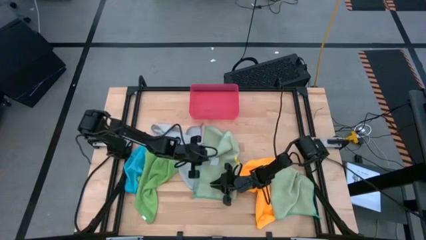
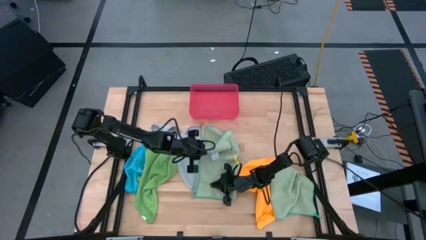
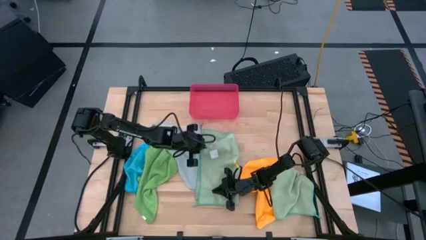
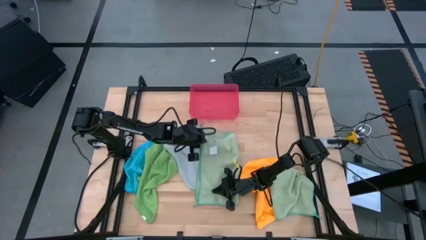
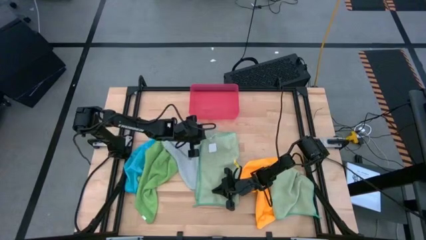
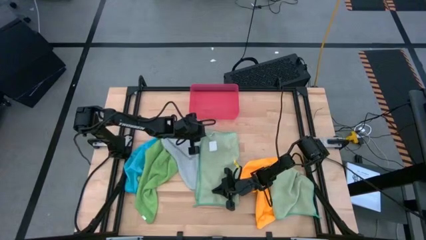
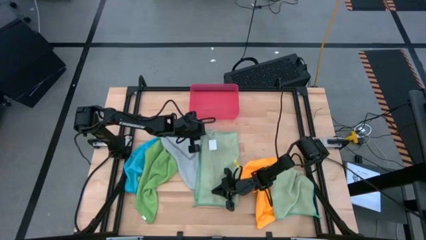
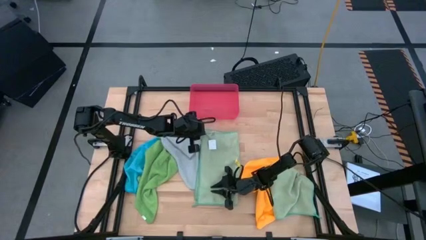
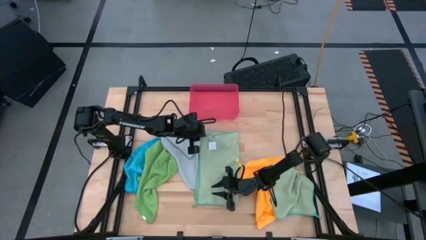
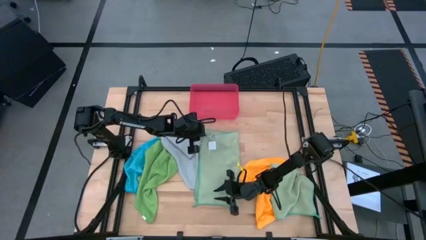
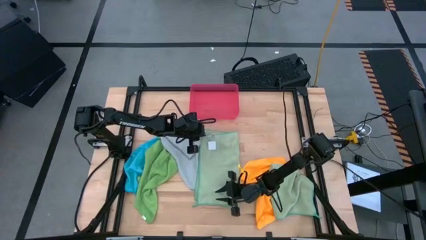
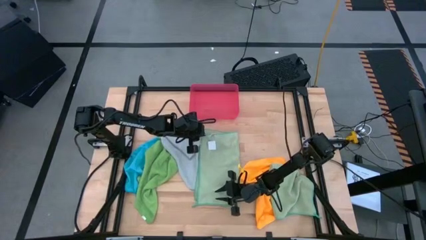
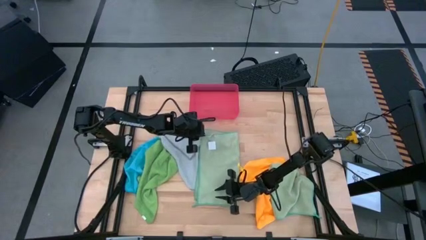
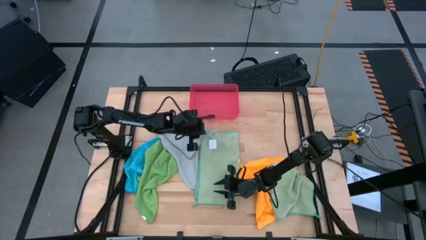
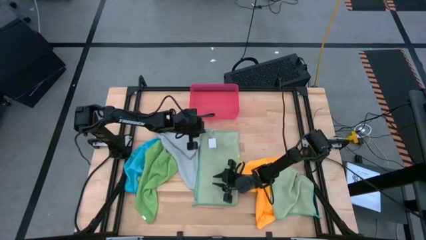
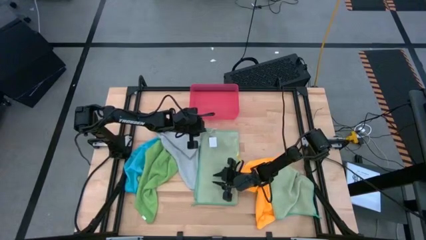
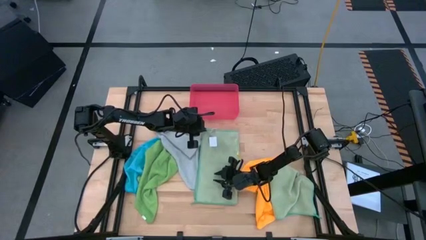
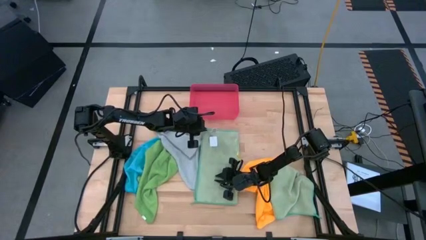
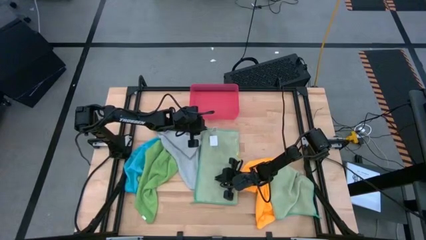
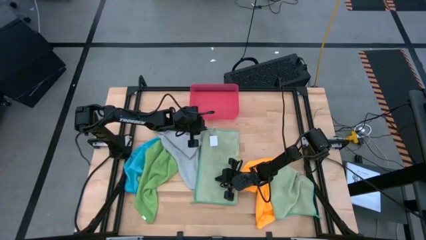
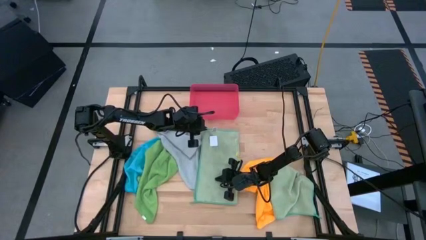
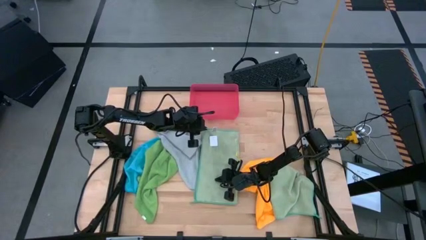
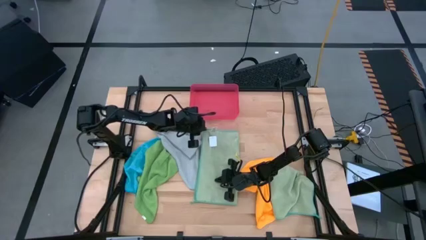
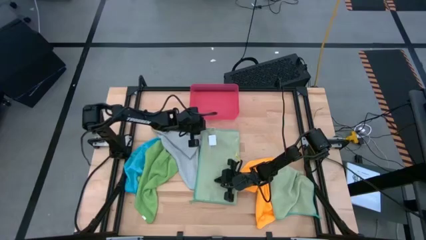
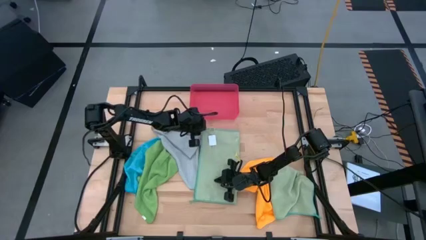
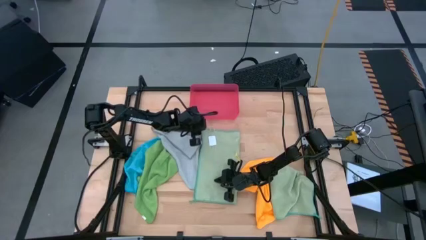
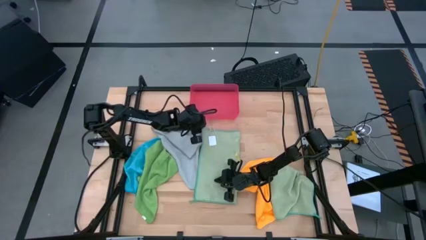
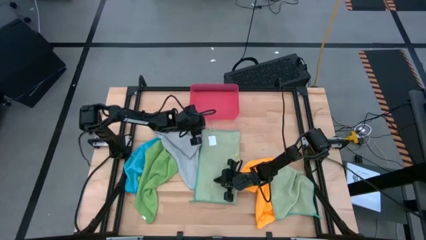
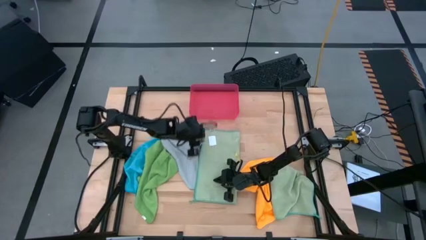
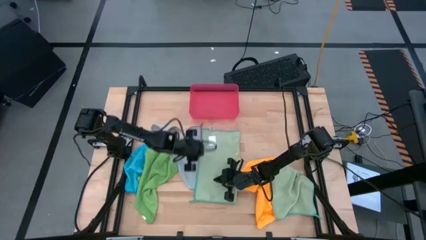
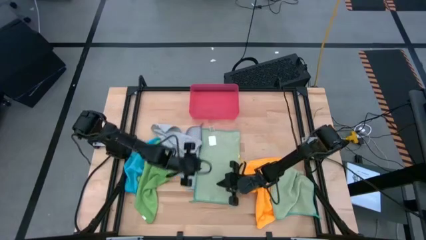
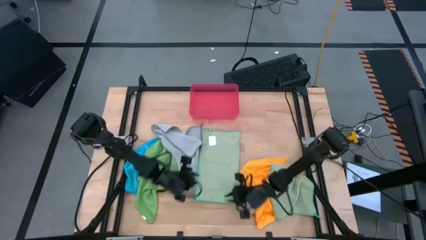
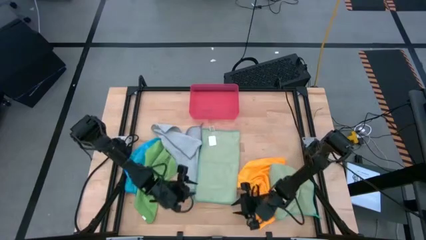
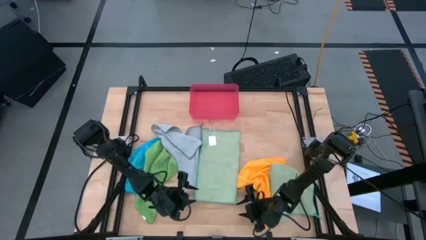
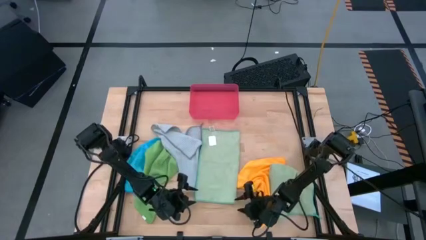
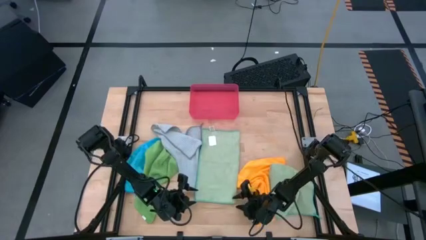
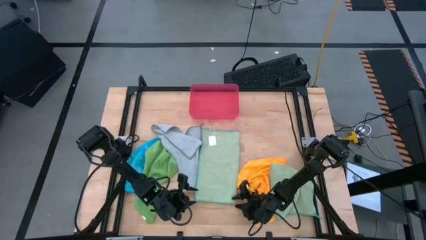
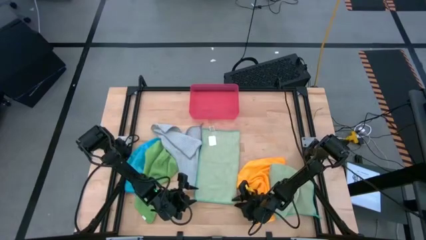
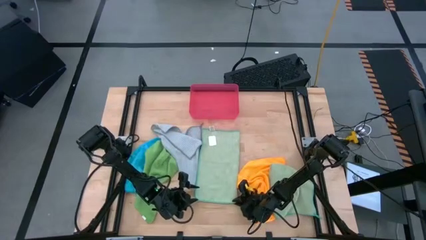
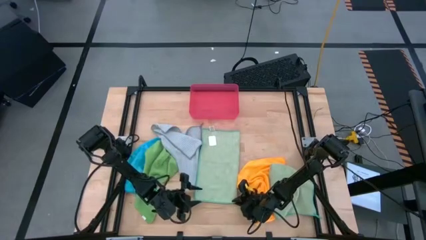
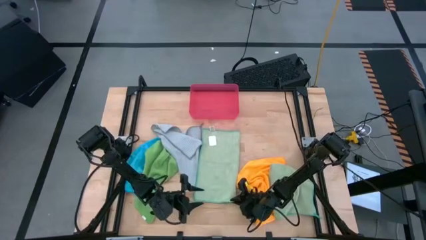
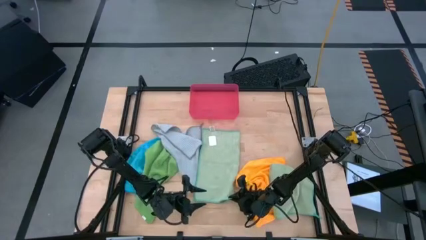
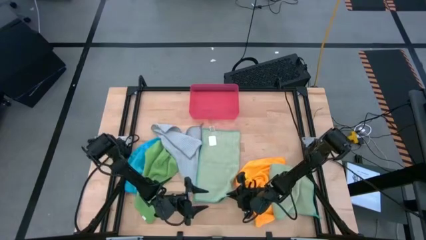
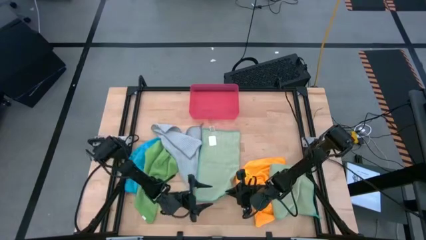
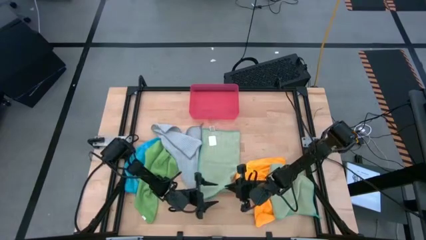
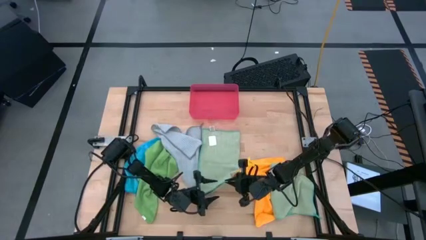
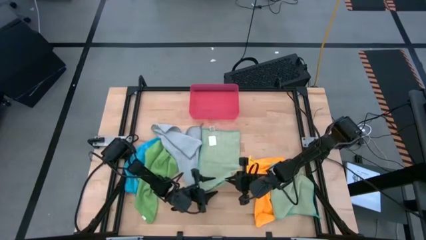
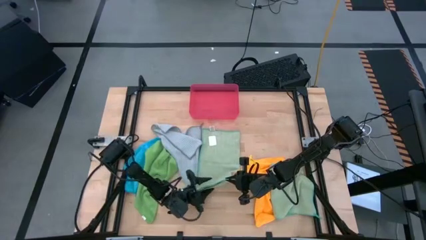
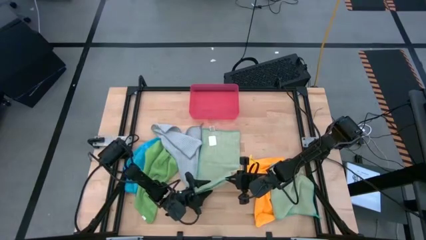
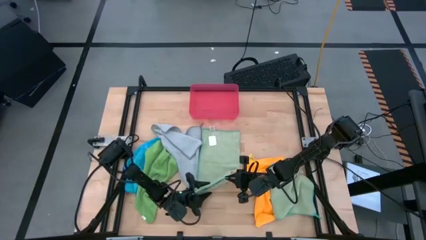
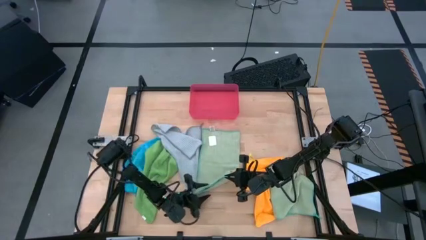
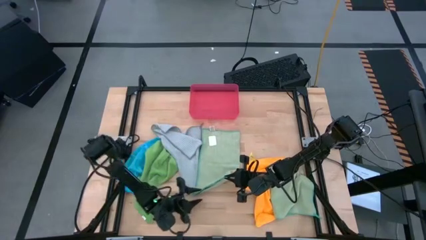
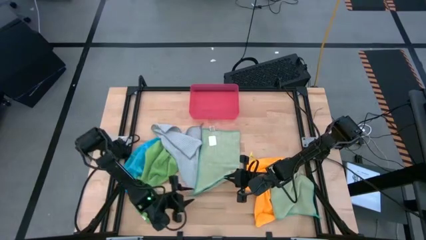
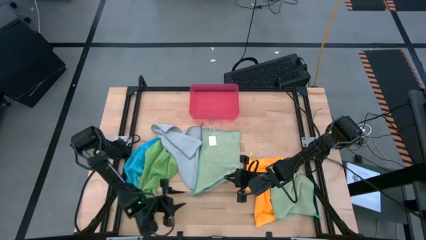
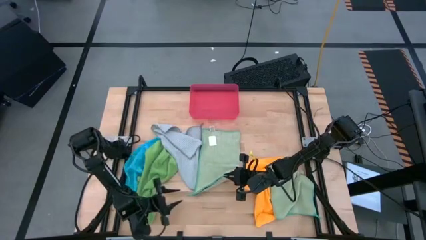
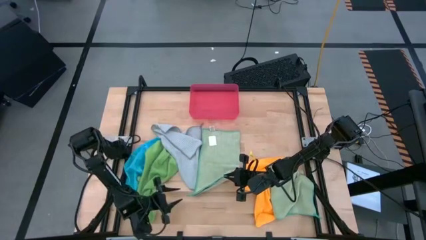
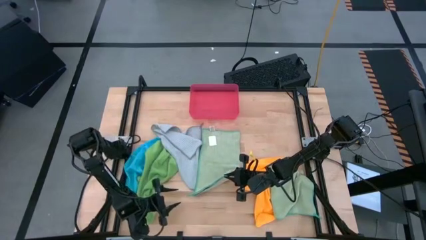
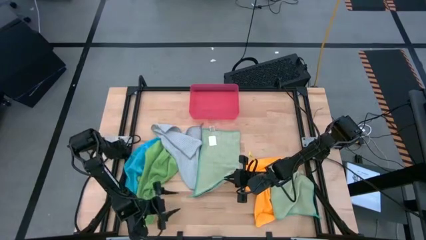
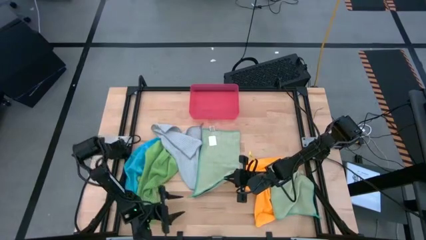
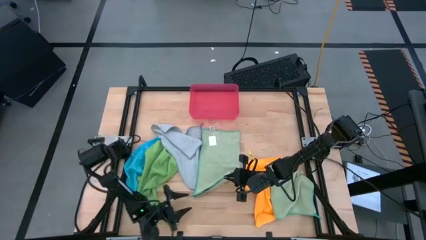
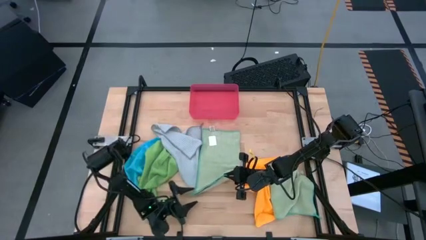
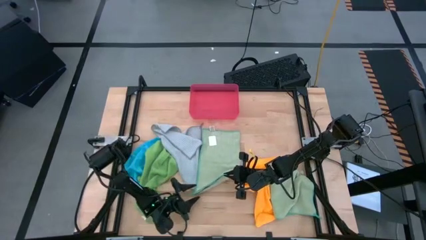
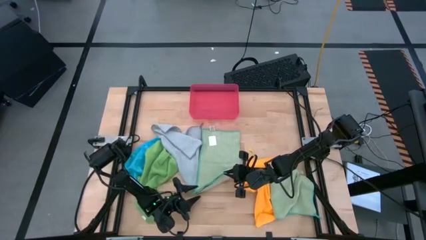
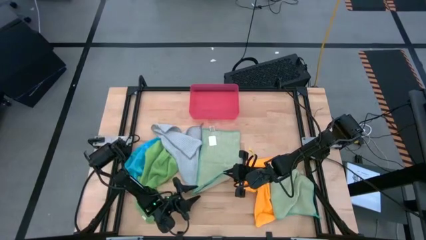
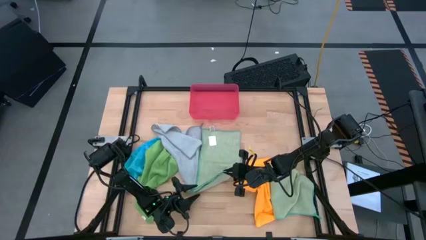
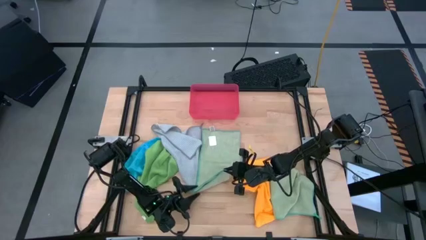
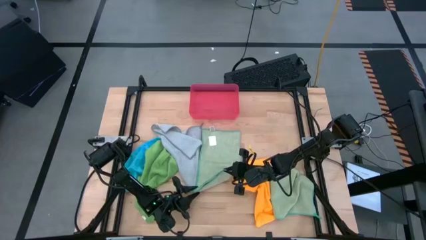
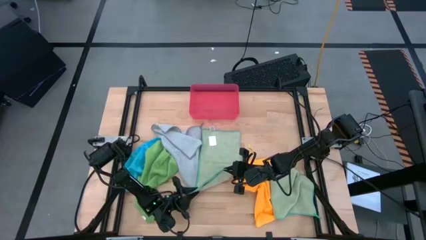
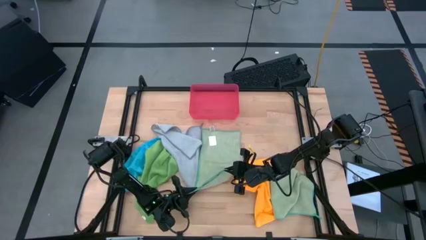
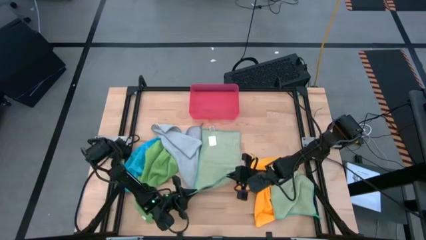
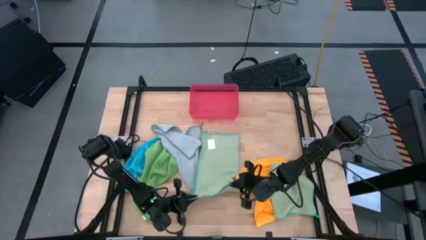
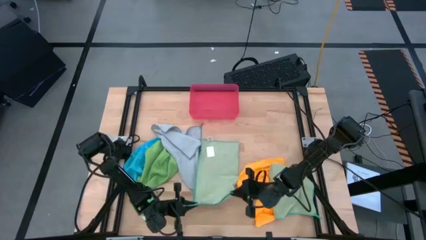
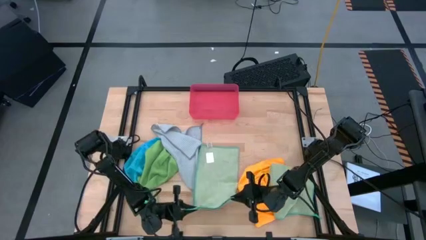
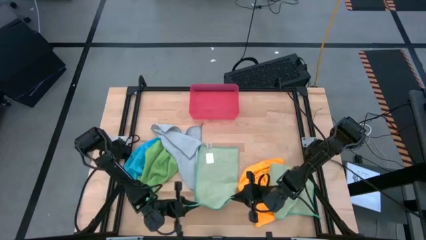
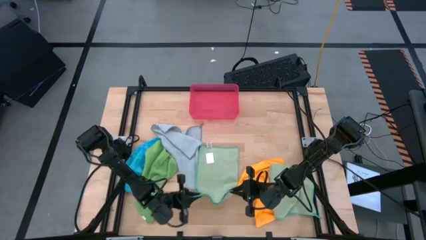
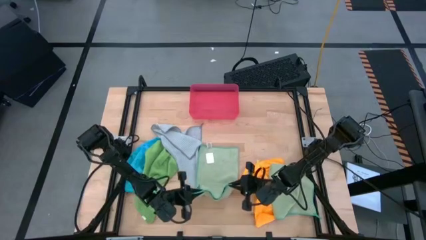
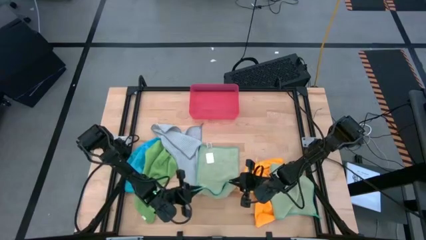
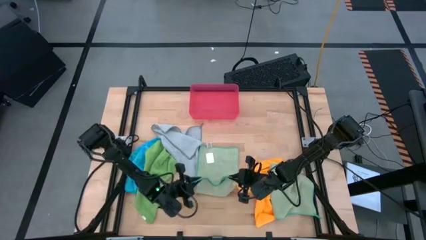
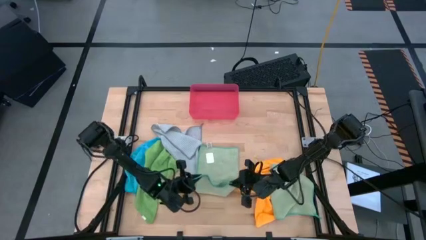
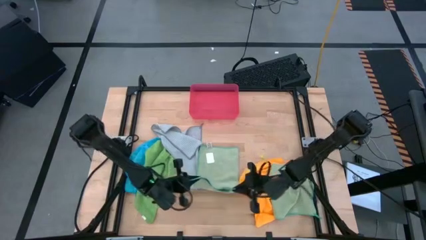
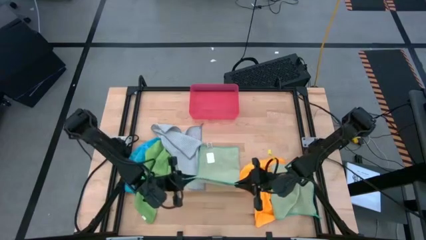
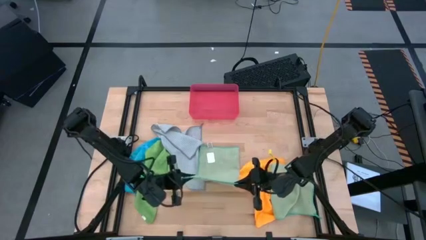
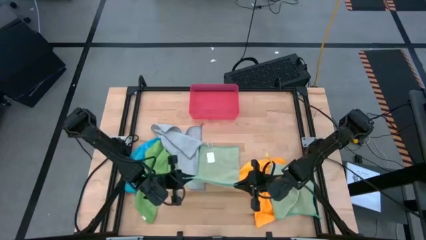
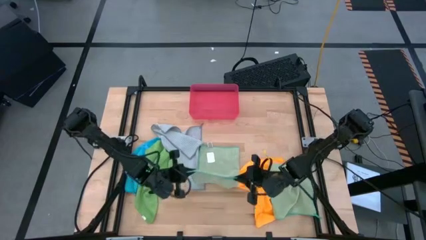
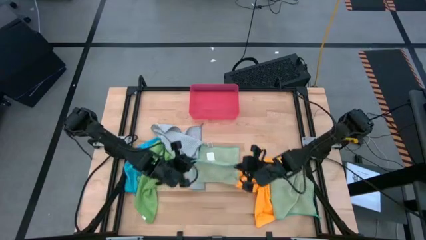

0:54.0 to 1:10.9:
Task: Fold microfiber towels
Fold the top light green towel
